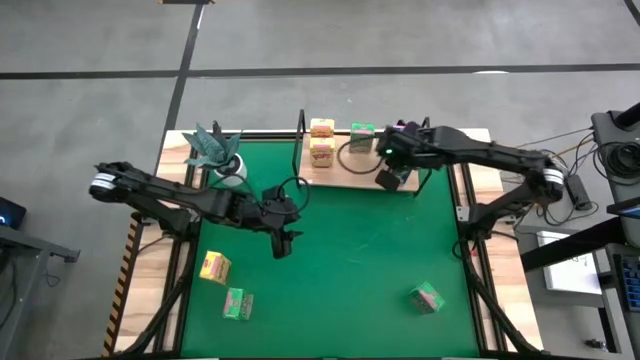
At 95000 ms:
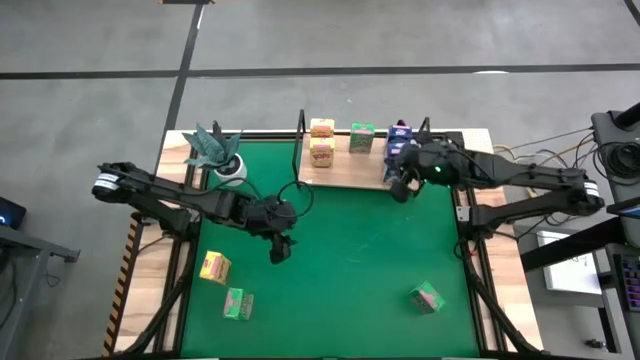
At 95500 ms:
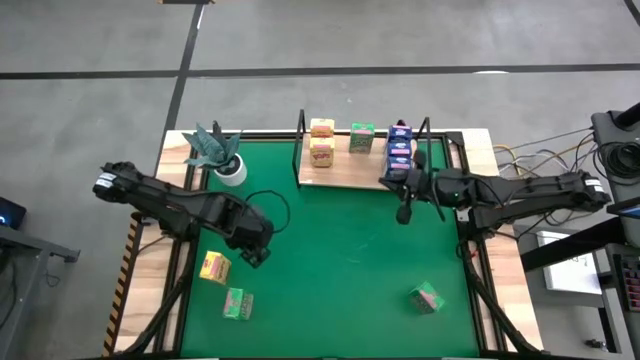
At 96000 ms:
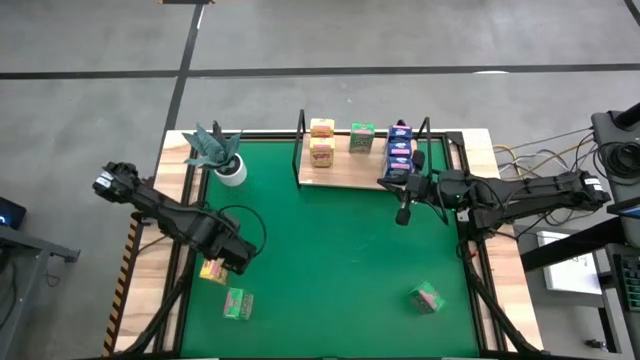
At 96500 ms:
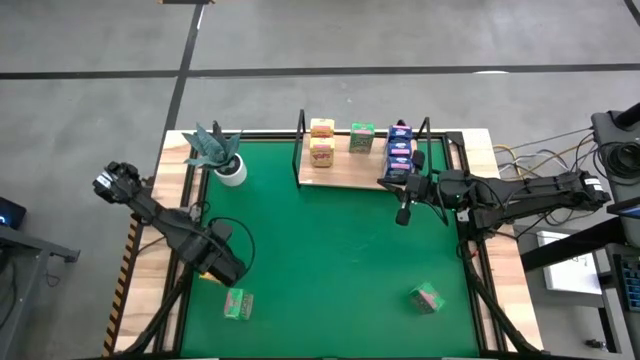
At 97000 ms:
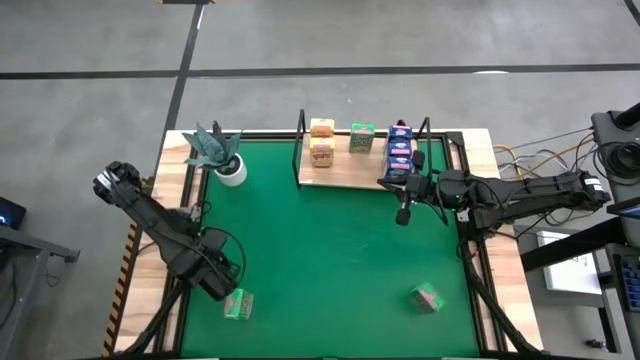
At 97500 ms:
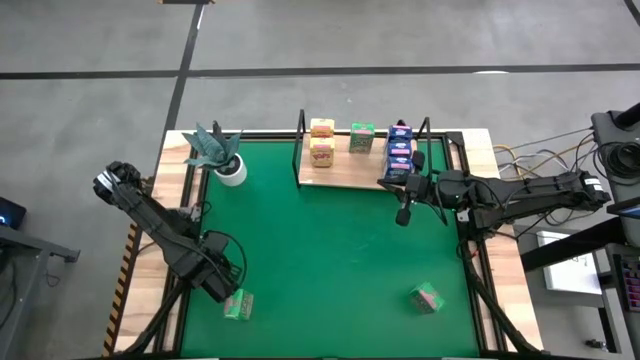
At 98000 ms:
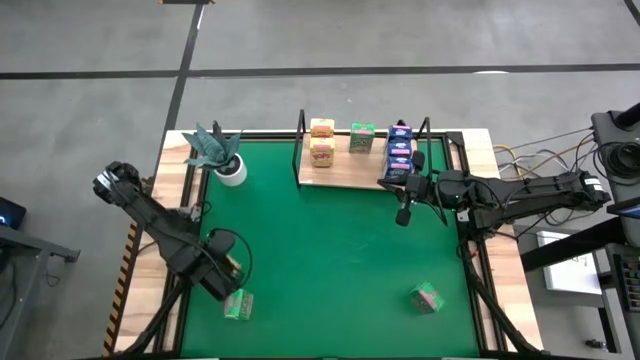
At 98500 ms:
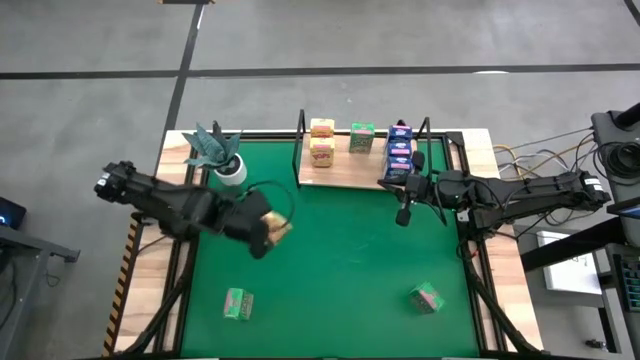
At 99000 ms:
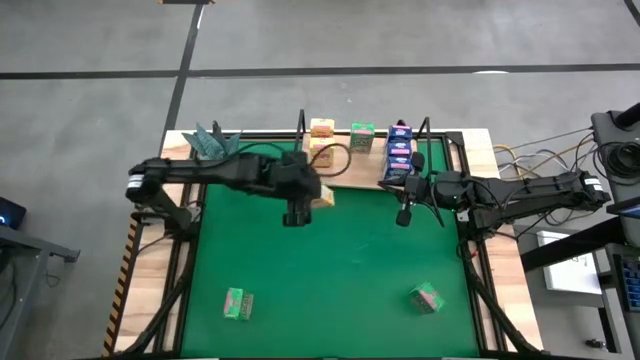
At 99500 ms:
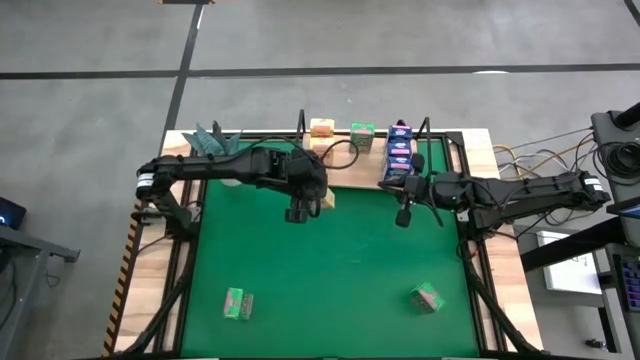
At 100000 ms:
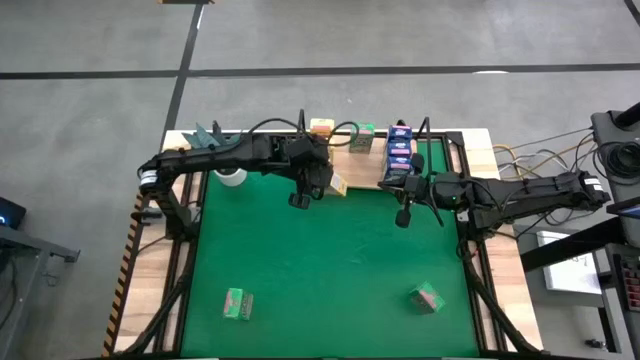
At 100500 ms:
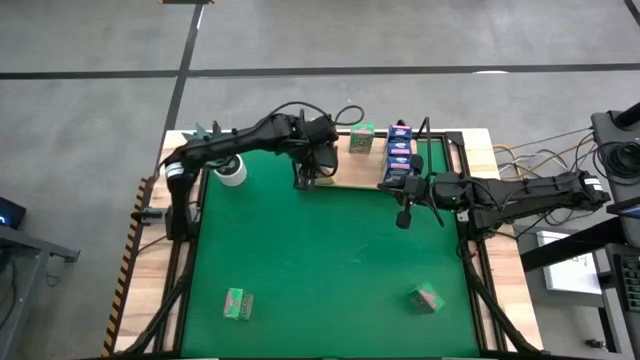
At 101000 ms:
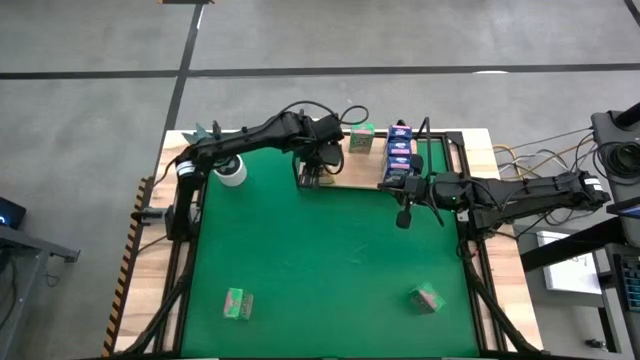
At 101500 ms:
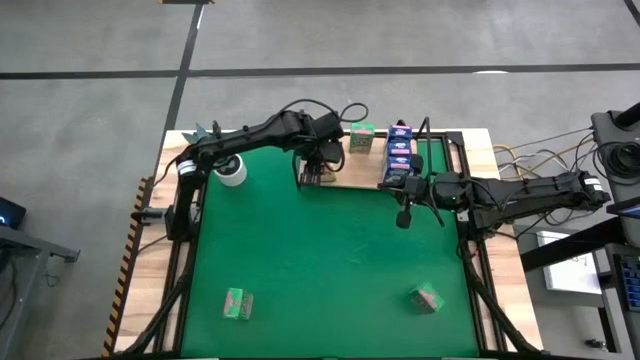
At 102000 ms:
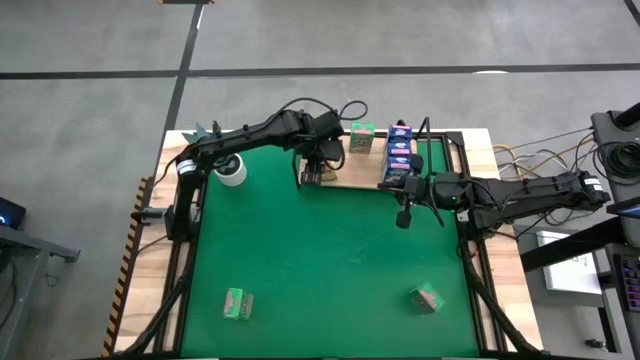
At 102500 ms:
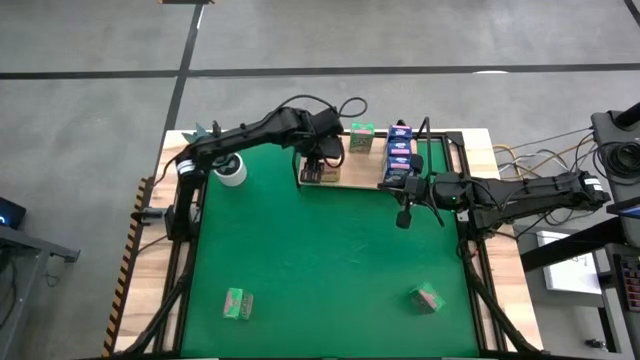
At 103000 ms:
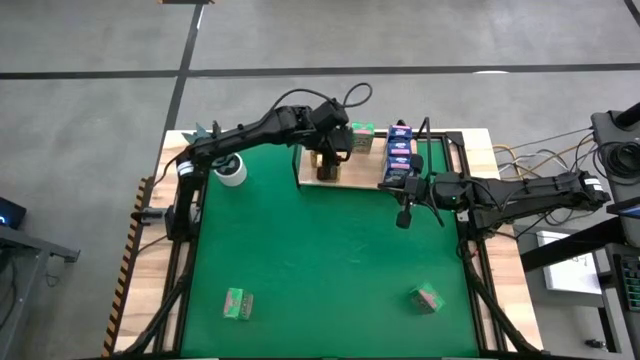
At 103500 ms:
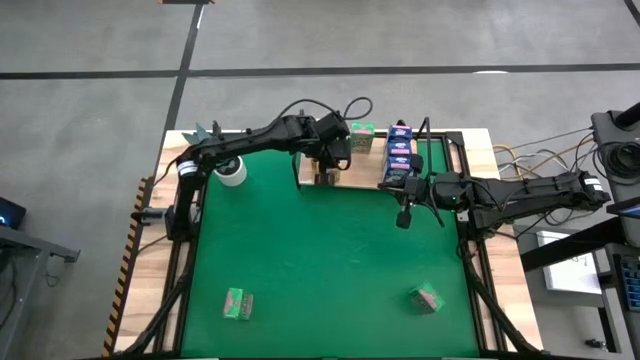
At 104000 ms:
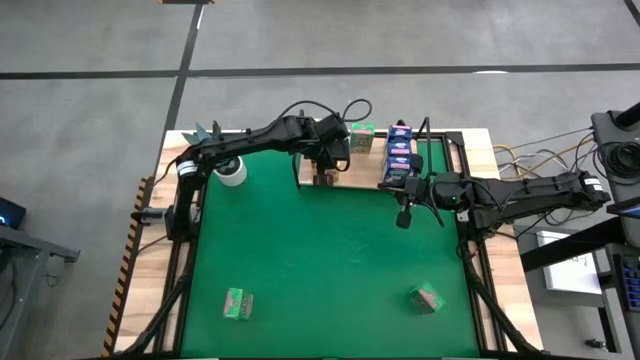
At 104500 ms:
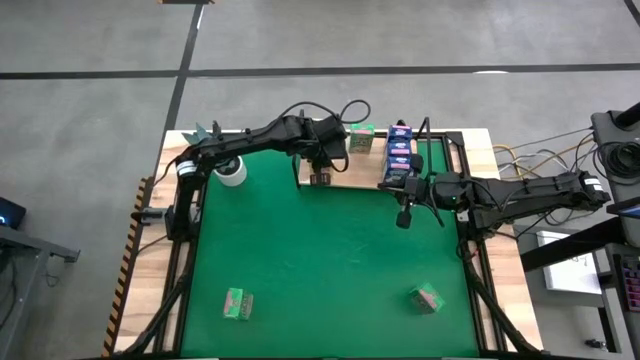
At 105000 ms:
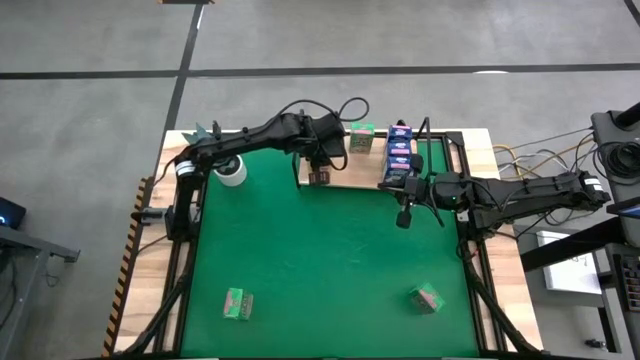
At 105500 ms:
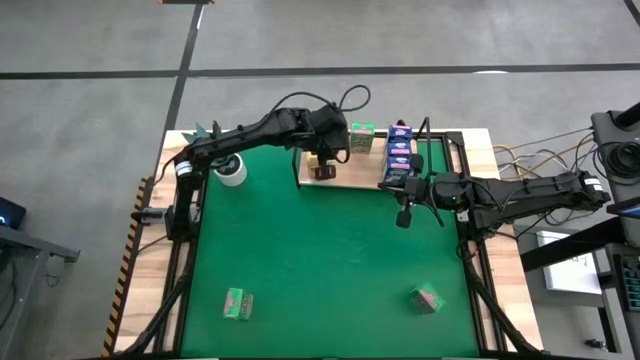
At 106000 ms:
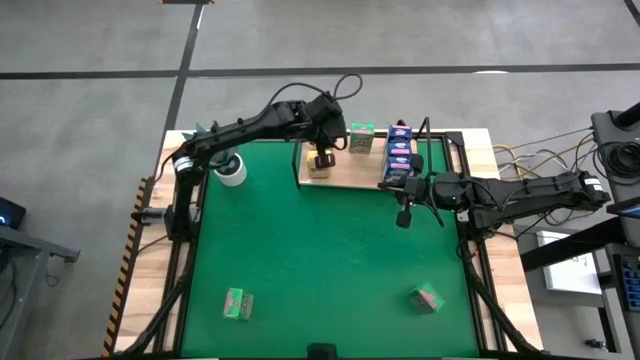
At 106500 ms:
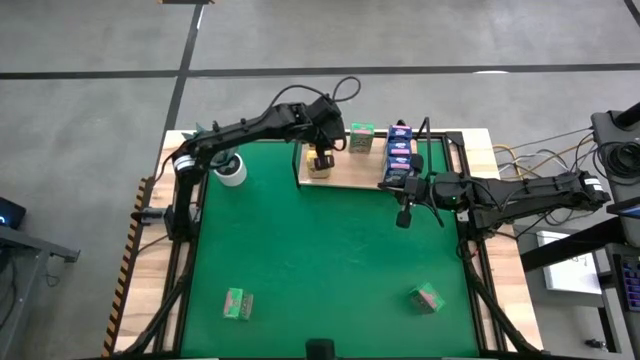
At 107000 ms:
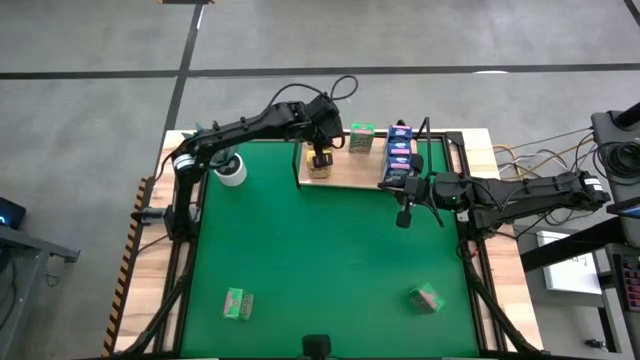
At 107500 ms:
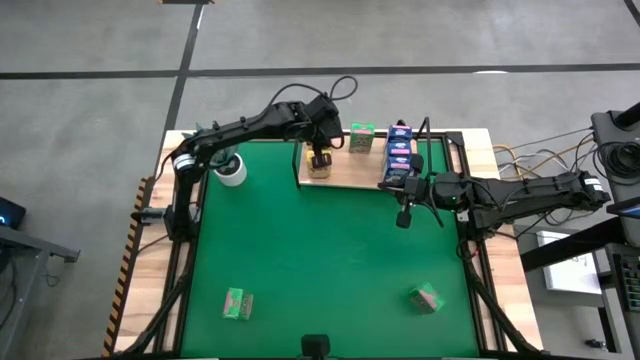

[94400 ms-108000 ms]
Task: Stack cereal on shelf
Put the yellow cereal box on the shelf

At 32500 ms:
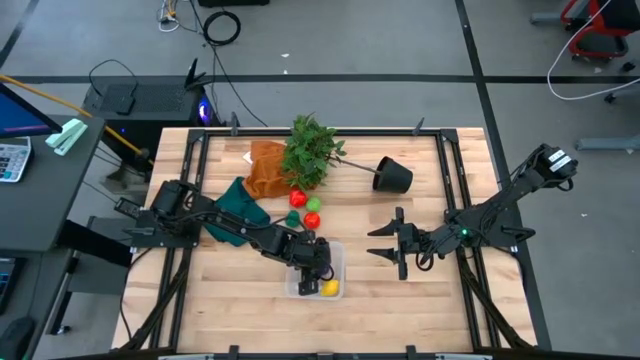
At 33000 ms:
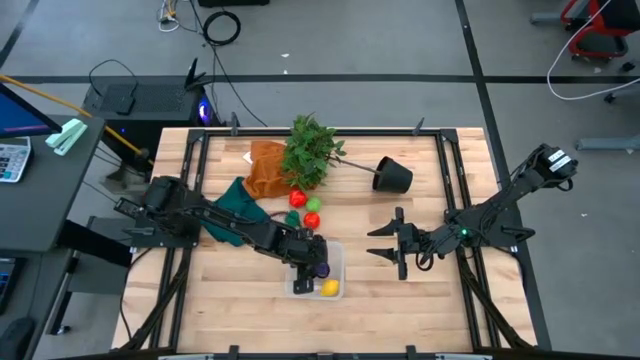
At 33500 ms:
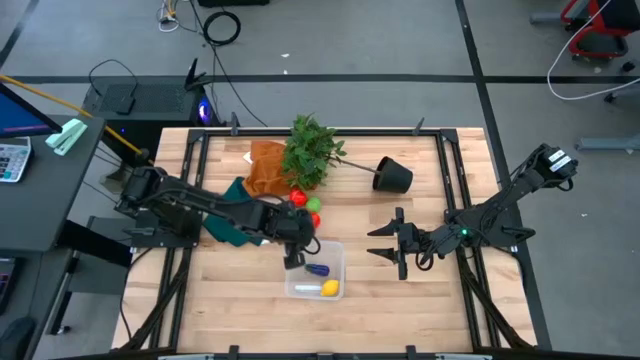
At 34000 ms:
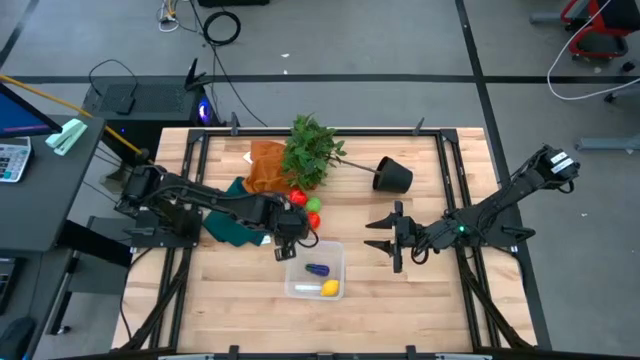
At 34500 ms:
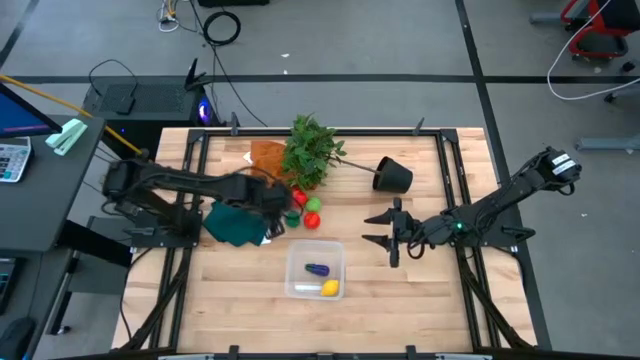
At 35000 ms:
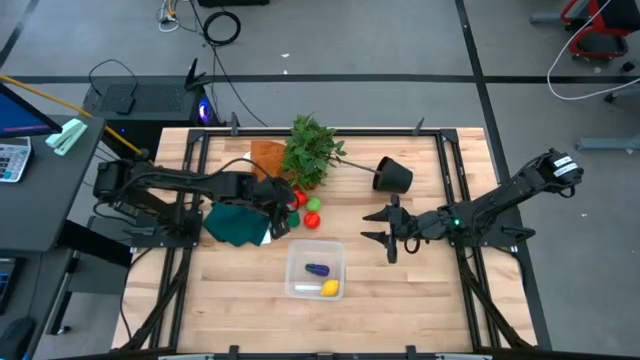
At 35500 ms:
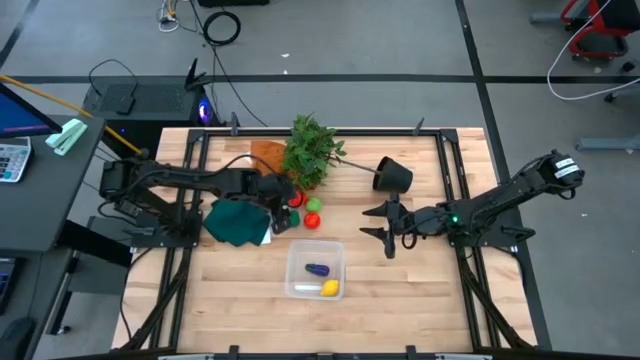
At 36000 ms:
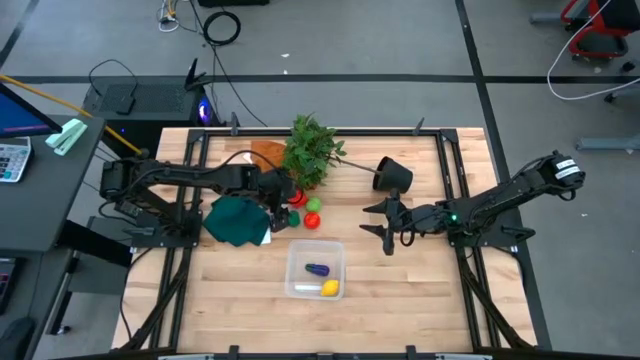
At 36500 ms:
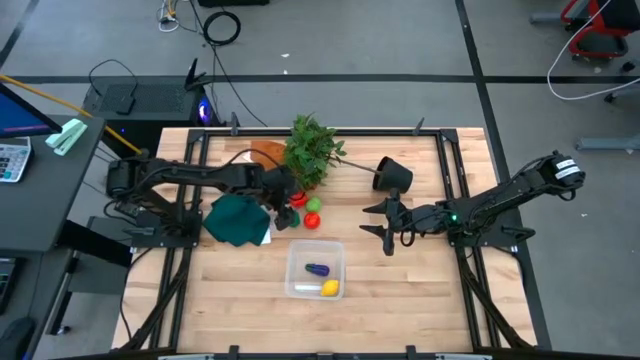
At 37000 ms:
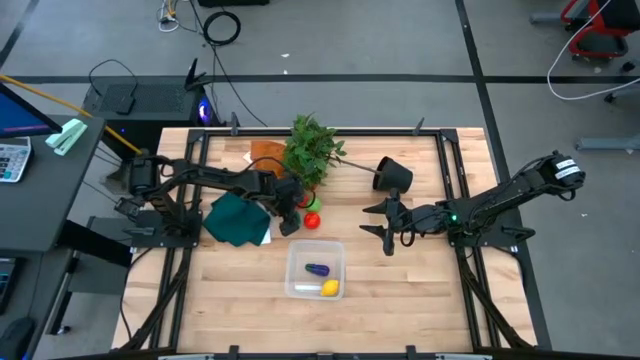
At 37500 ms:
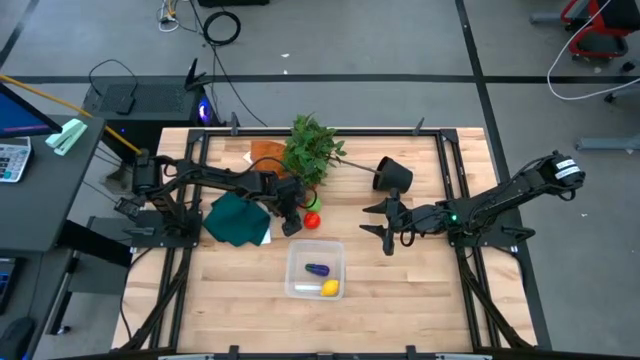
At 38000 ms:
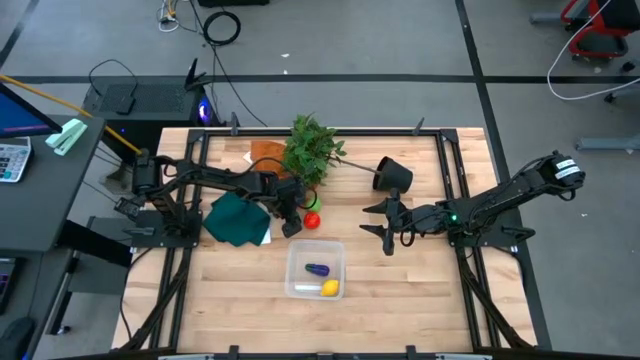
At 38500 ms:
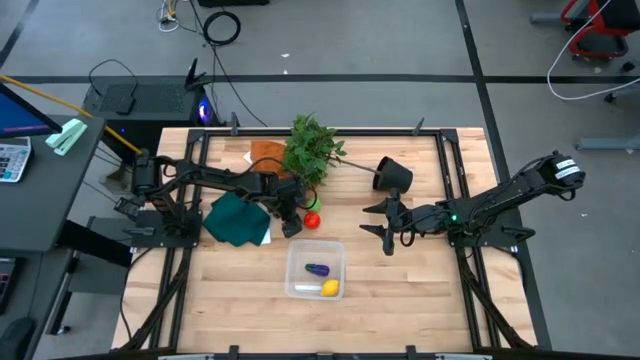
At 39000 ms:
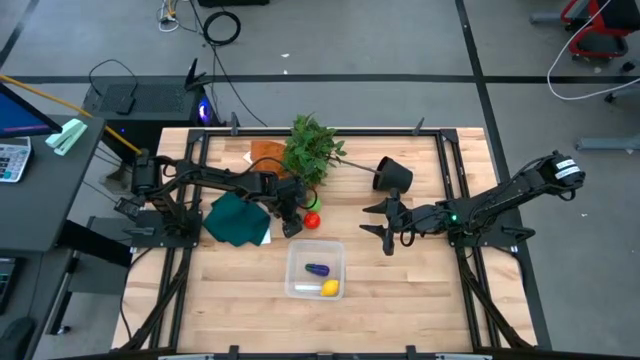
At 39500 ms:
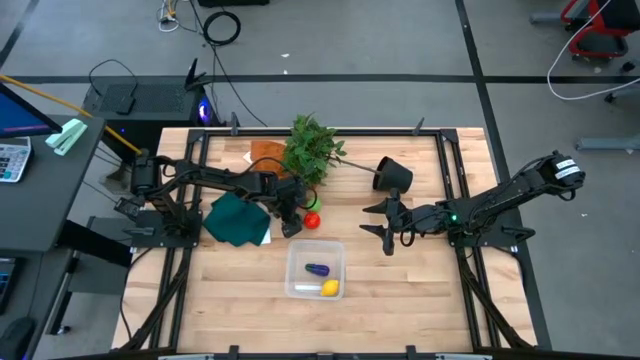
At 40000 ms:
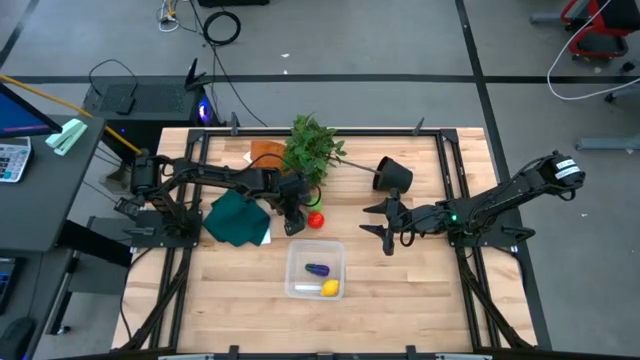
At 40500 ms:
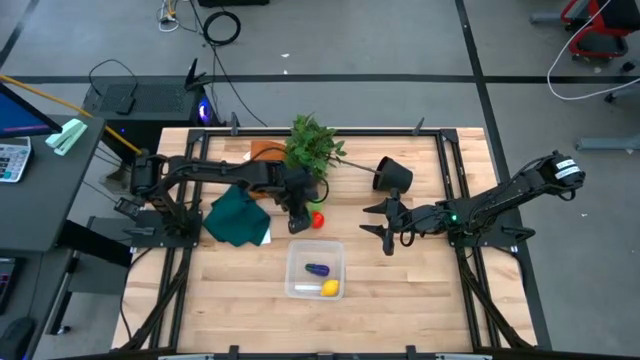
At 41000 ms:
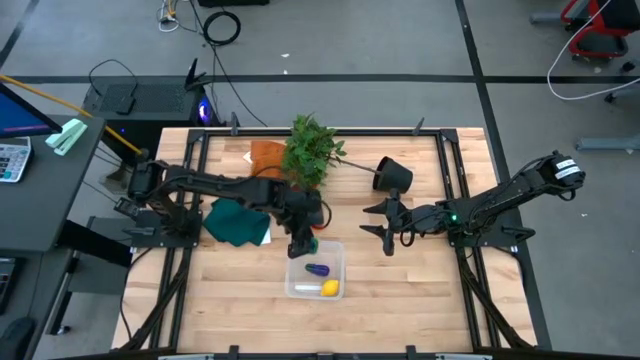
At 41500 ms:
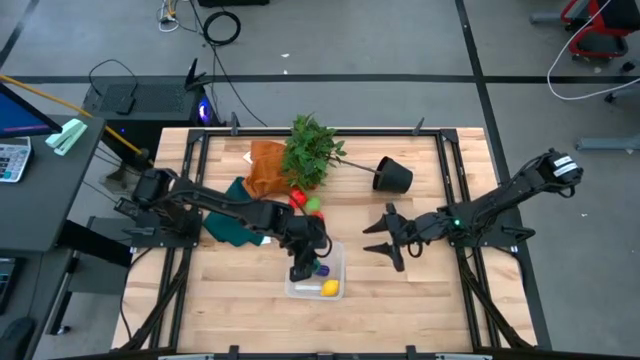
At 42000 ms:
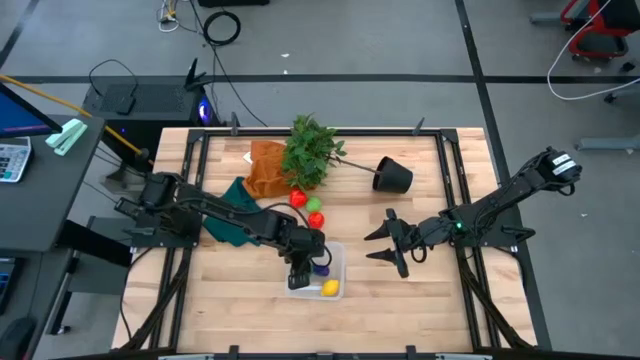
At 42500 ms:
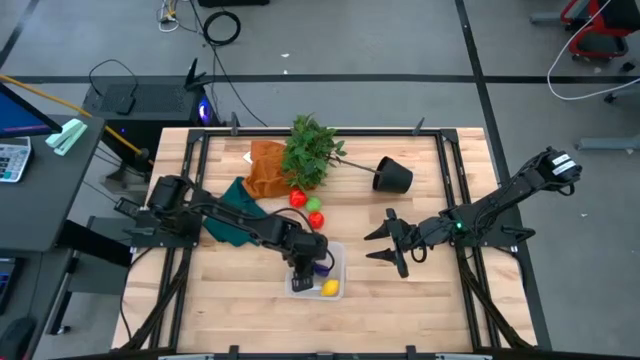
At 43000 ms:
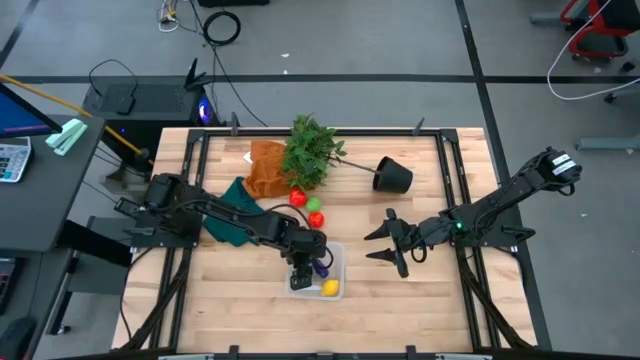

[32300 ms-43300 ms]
Task: Pick and placing Produce into tupperware
Put the green bell pepper into the transparent bin
